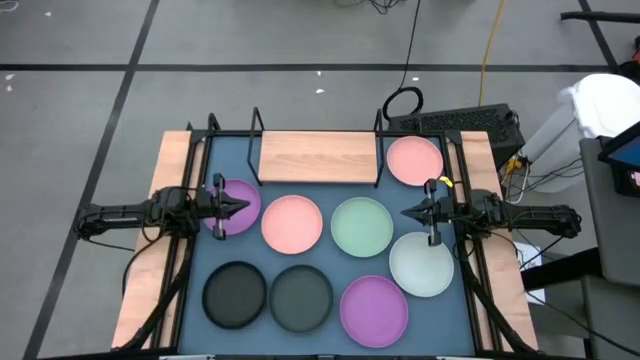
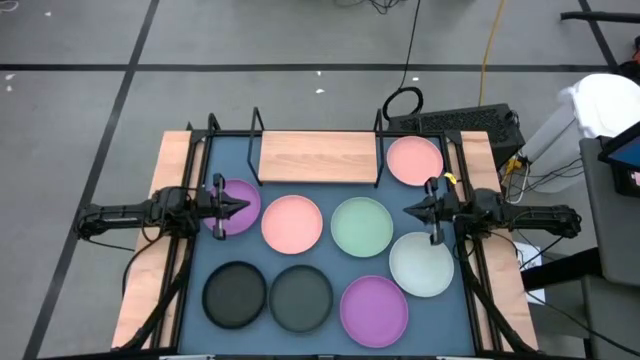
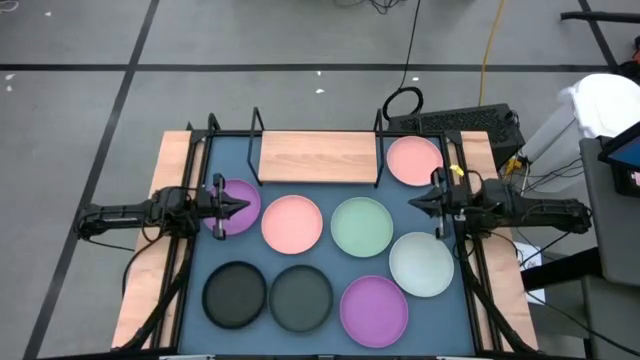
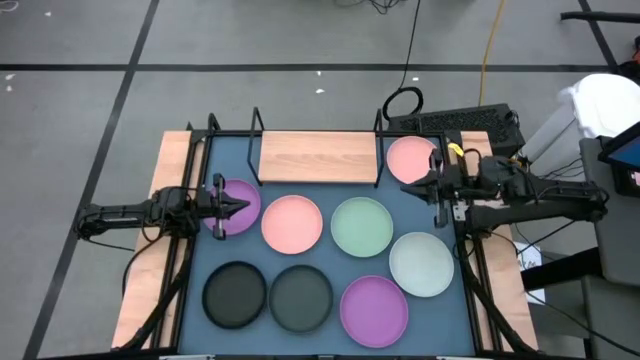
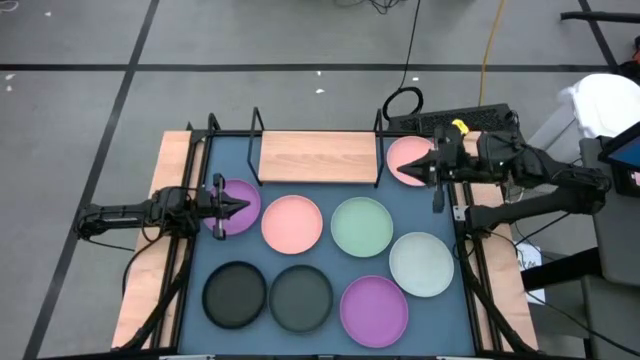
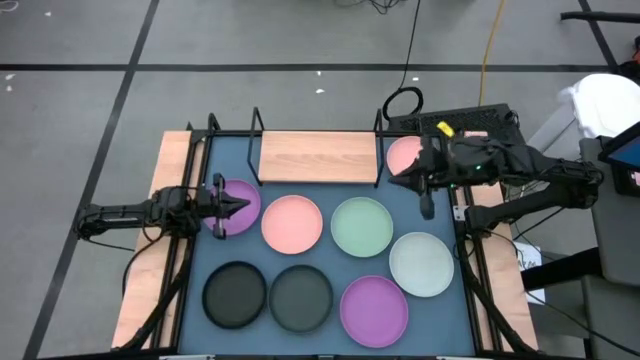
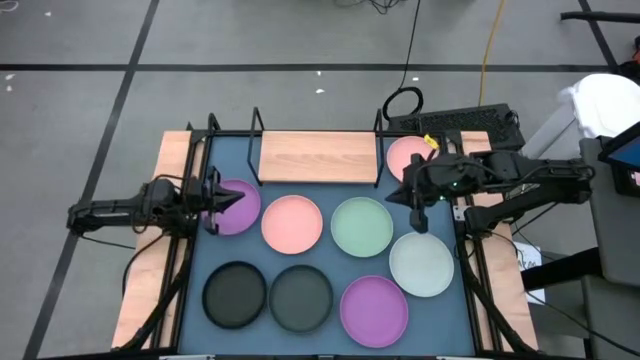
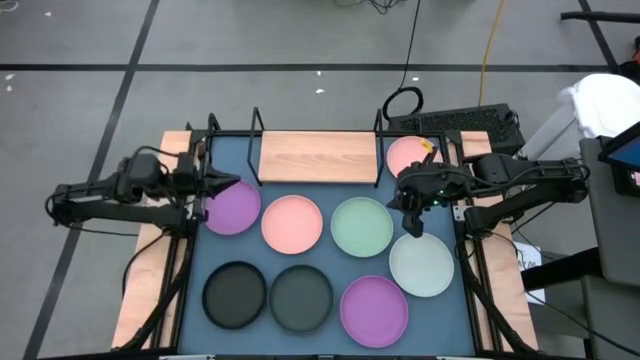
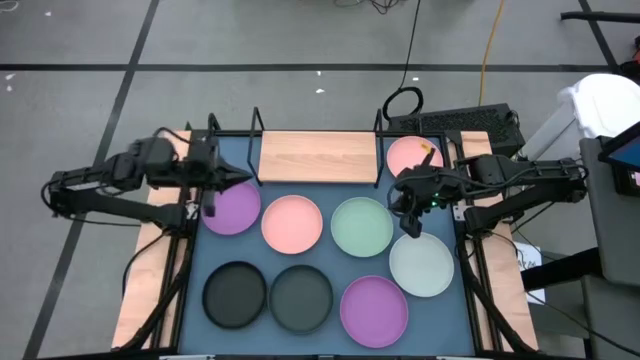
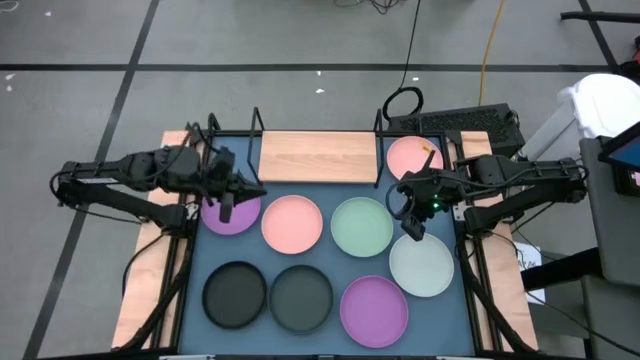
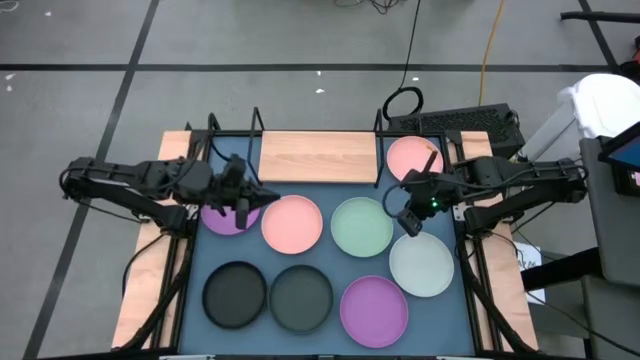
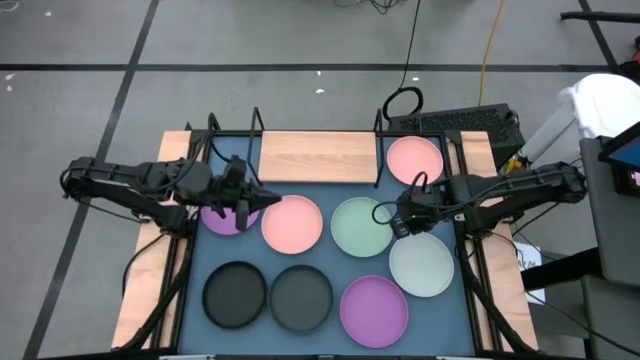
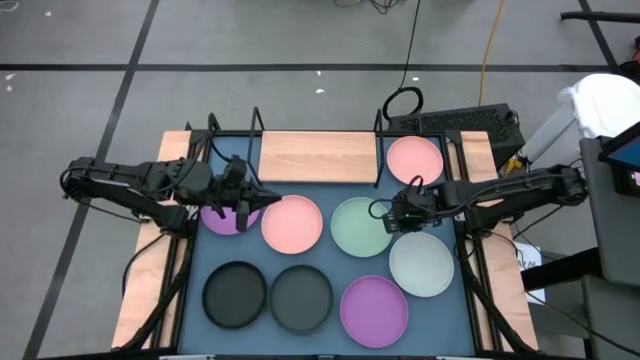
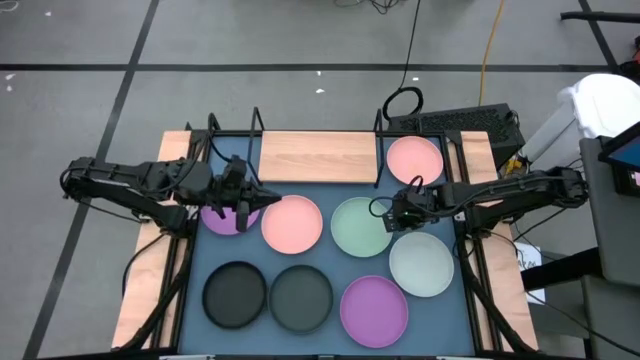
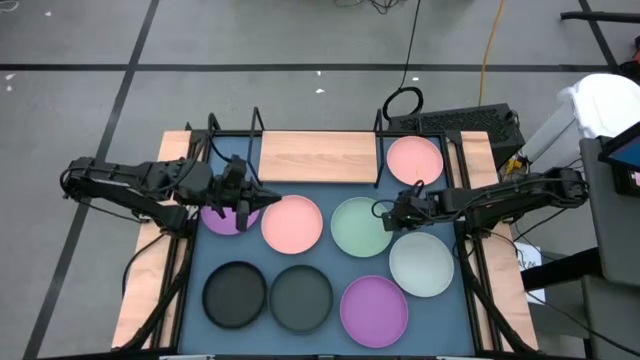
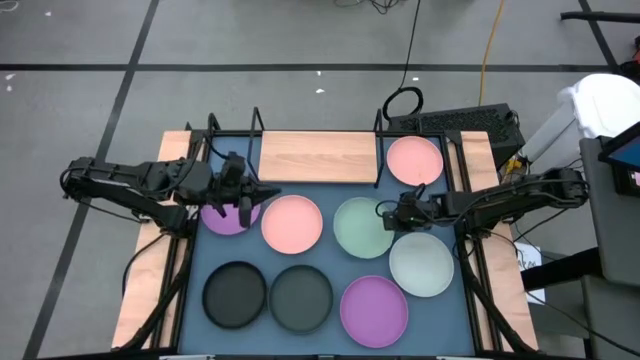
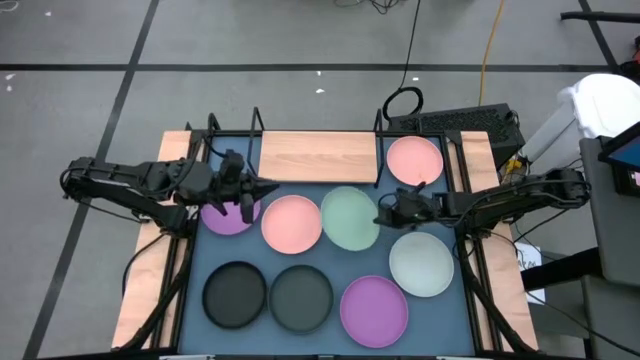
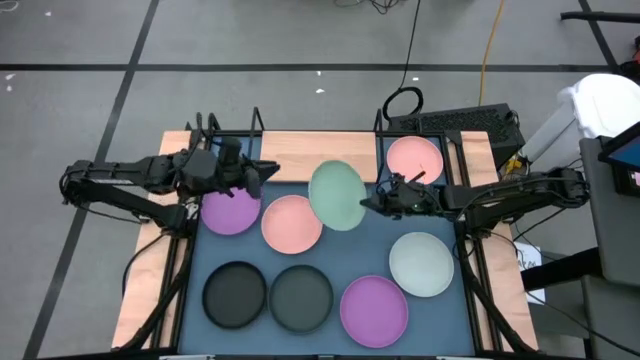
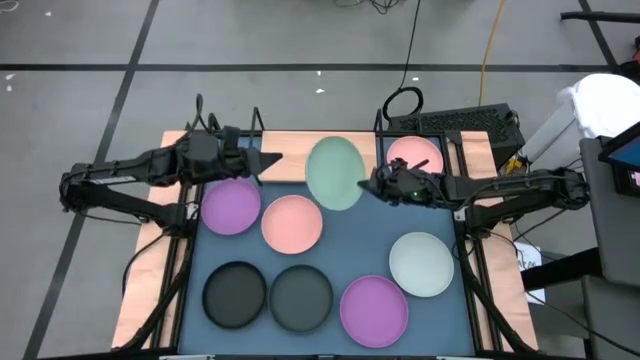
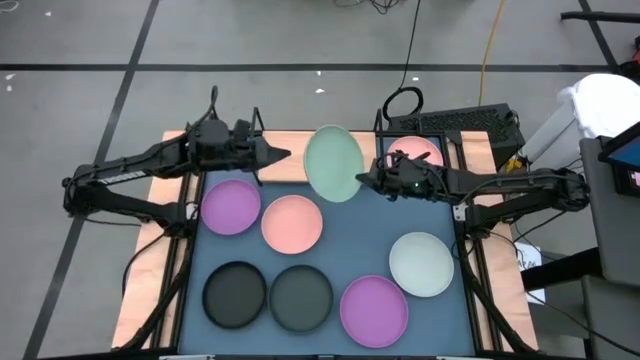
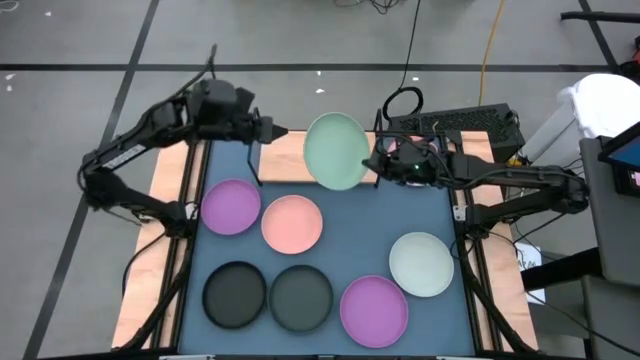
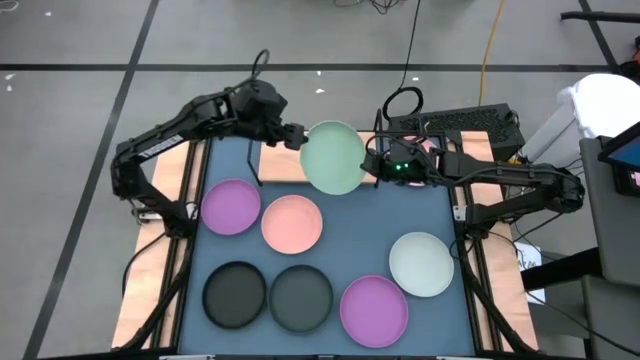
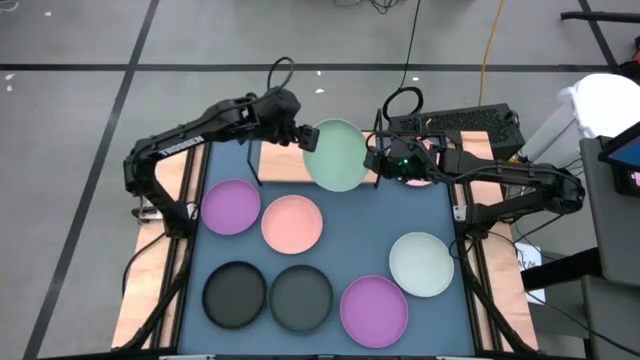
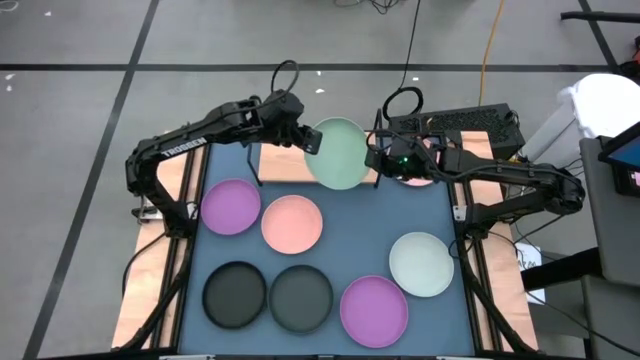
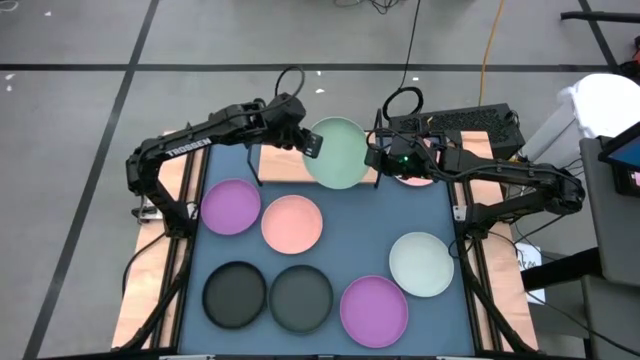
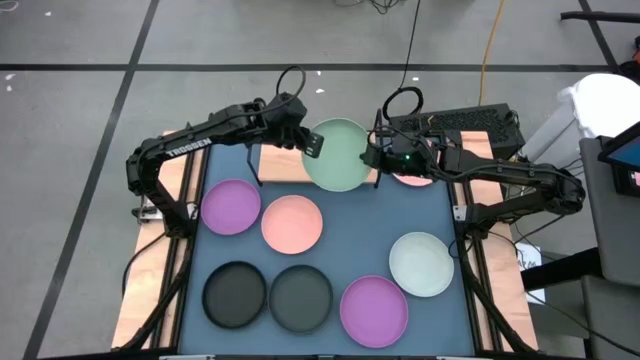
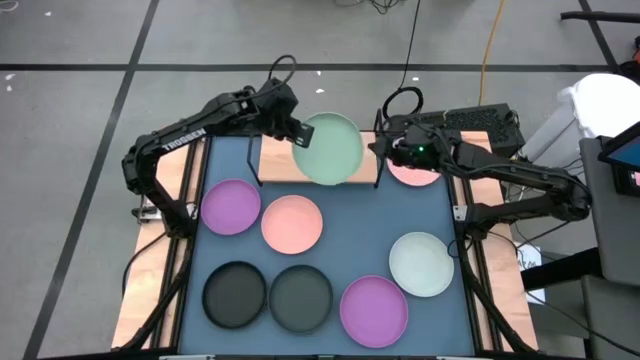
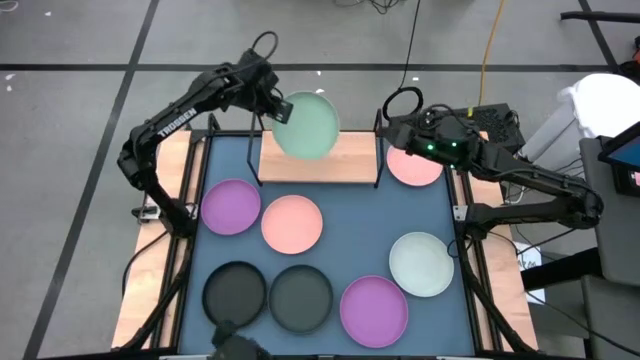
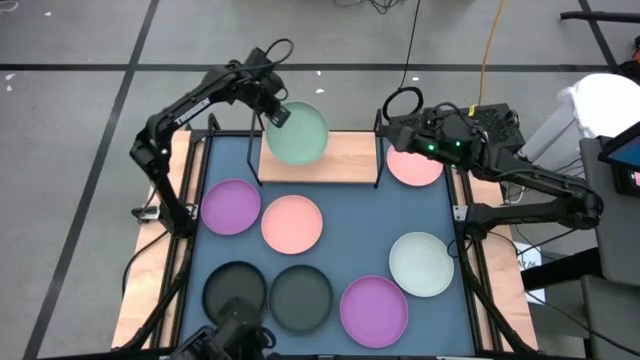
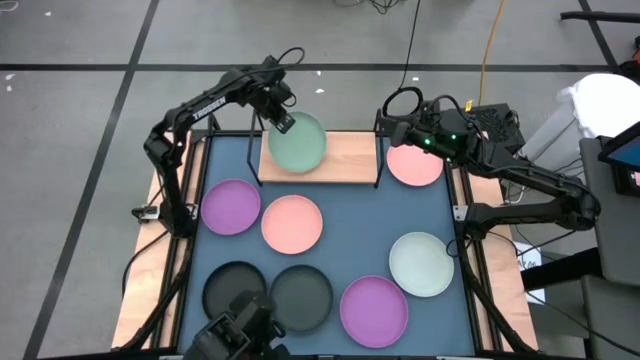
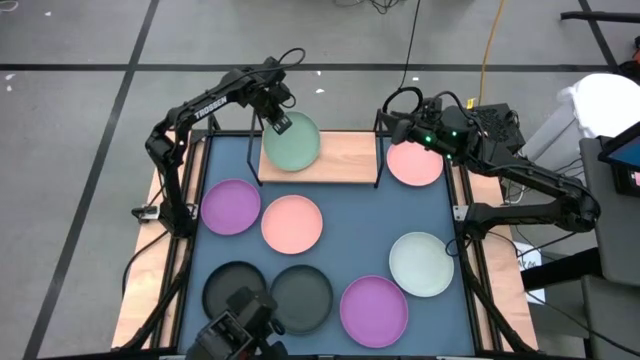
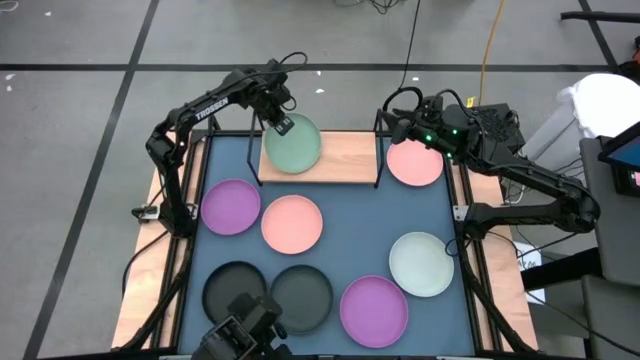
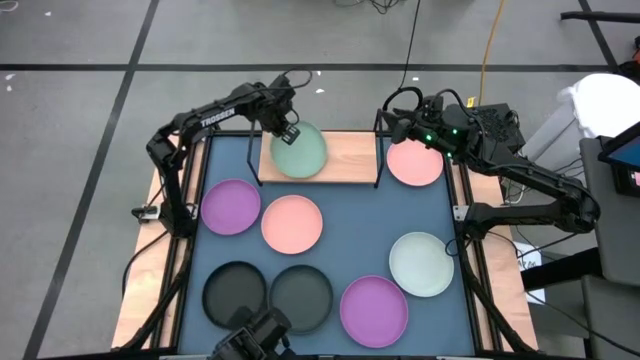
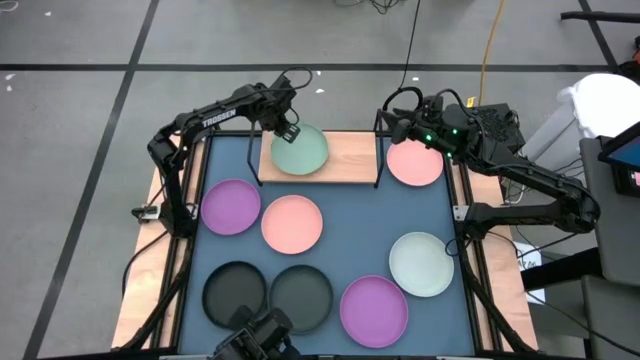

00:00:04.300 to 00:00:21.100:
Task: Place and stack plates onto a shelf
Put the green plate on the shelf

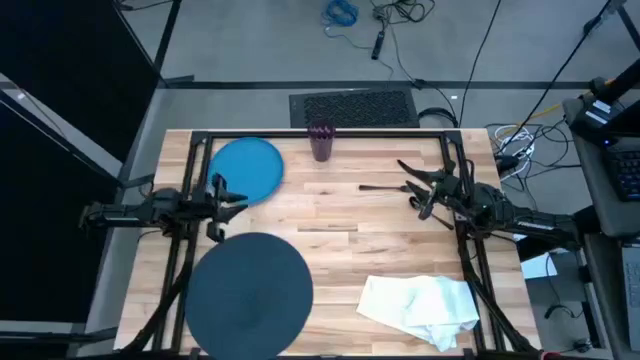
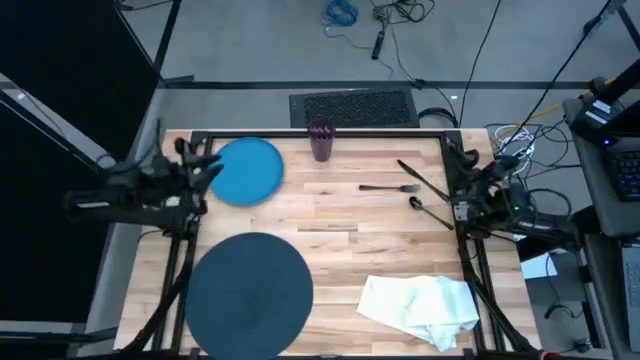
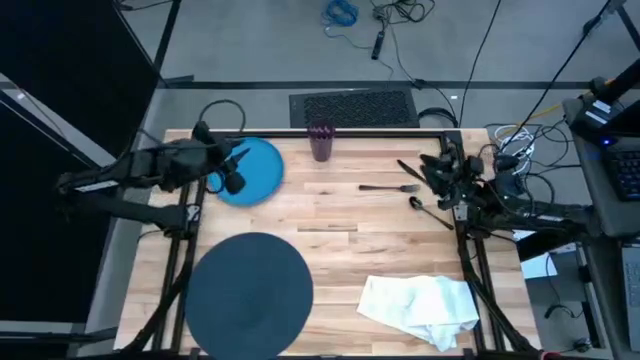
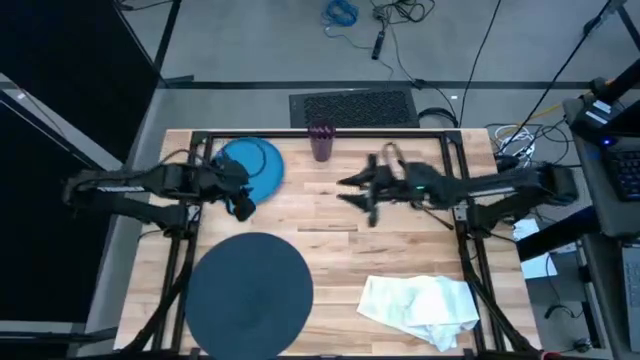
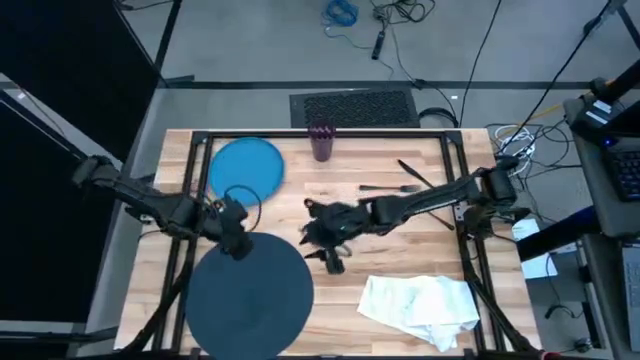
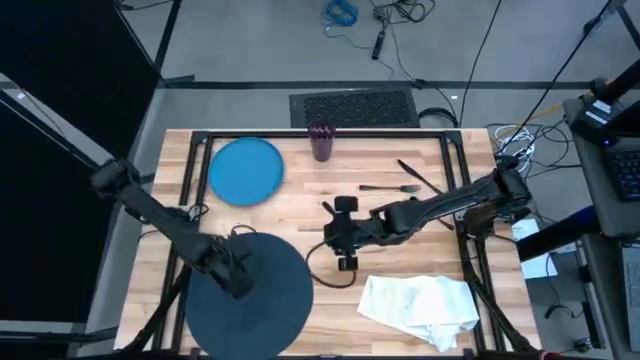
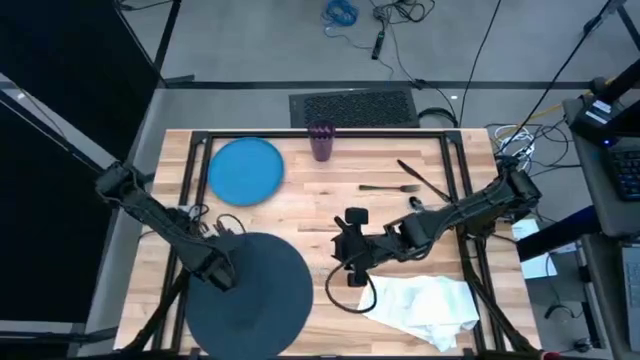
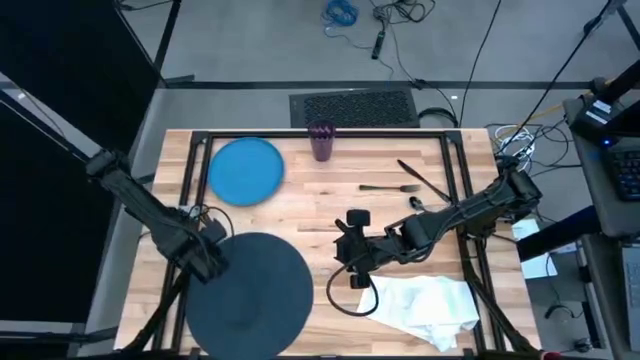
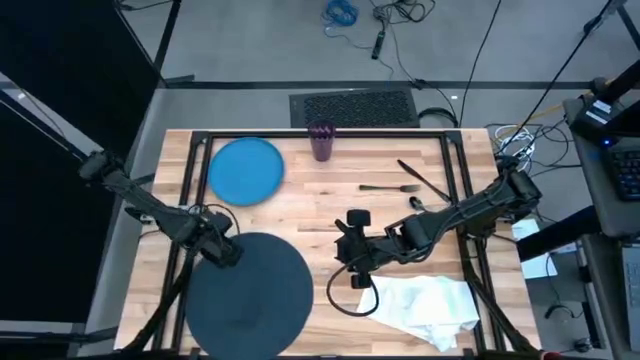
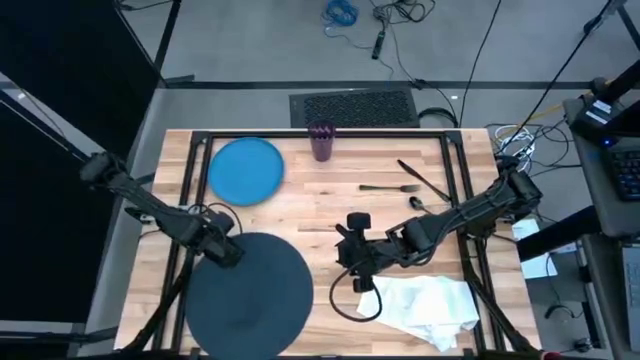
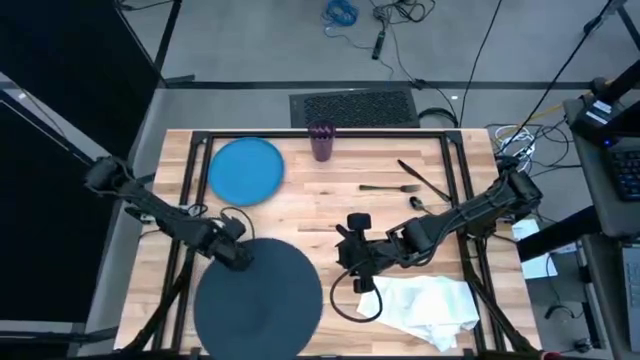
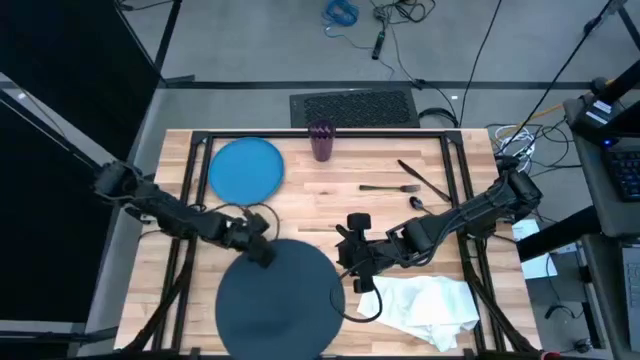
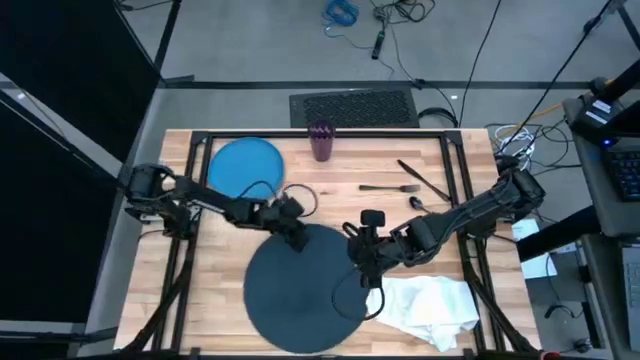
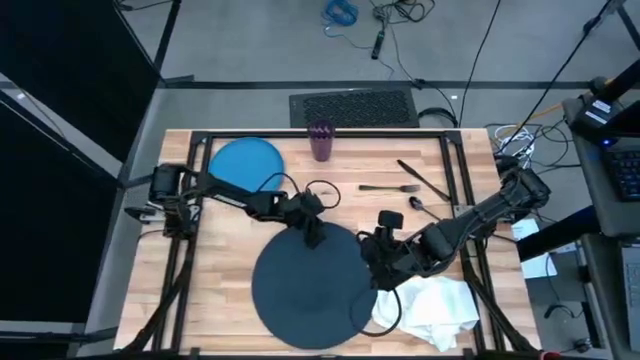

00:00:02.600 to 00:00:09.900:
Task: Set table place
Move the dark blue placemat to the center of the table
